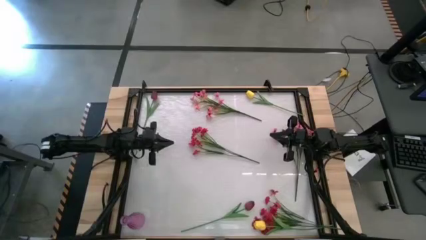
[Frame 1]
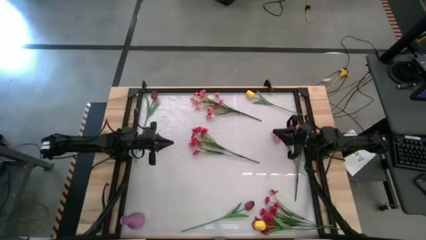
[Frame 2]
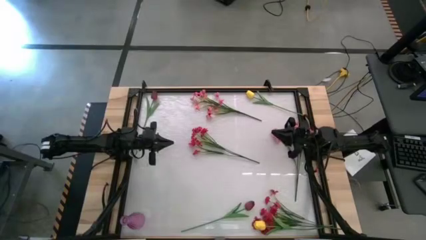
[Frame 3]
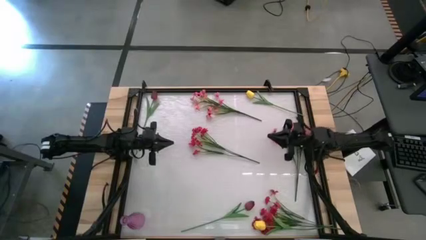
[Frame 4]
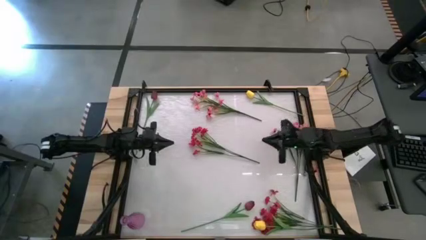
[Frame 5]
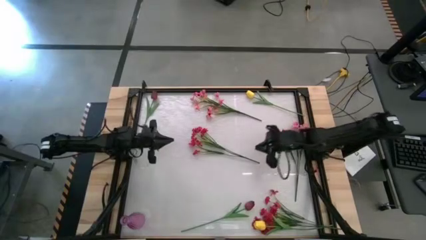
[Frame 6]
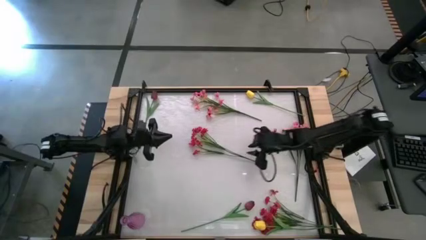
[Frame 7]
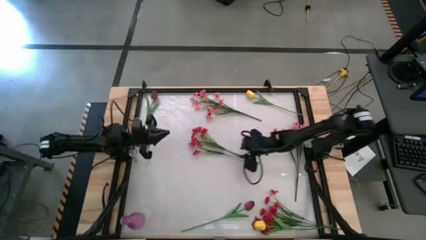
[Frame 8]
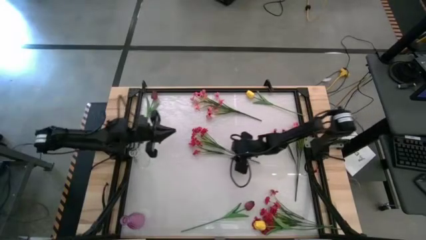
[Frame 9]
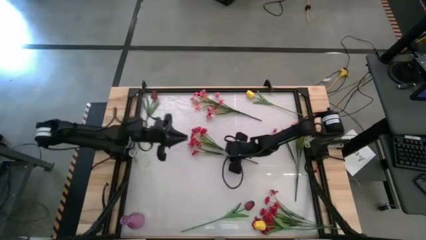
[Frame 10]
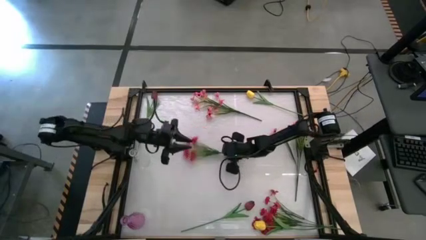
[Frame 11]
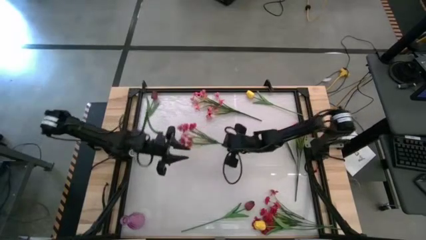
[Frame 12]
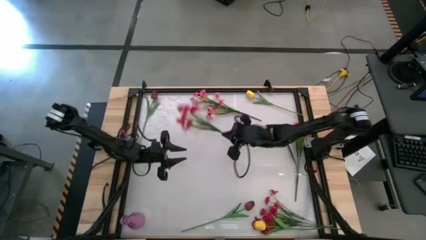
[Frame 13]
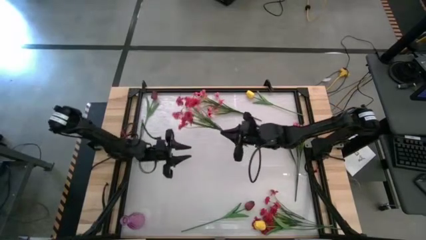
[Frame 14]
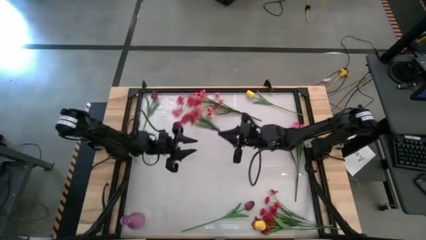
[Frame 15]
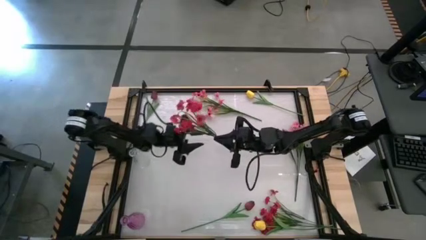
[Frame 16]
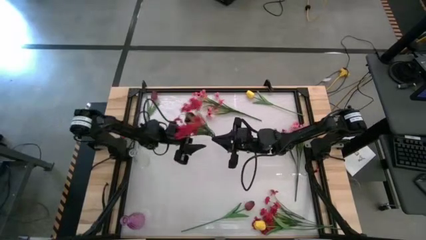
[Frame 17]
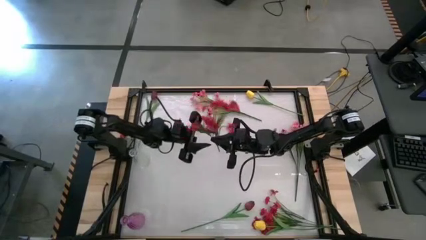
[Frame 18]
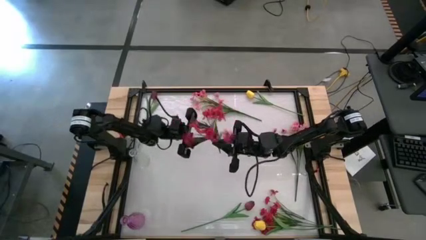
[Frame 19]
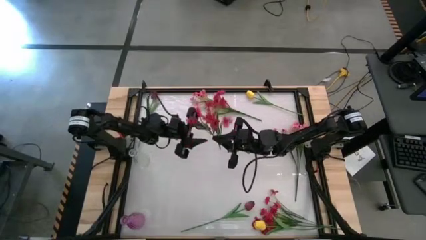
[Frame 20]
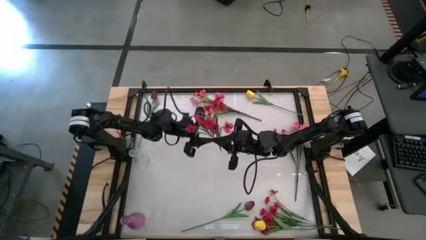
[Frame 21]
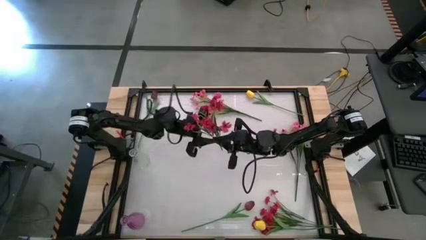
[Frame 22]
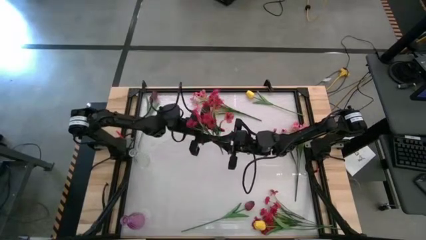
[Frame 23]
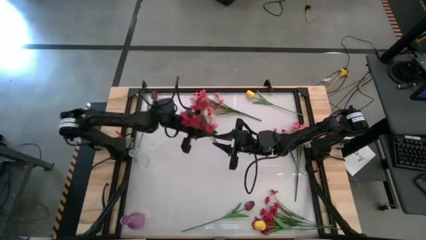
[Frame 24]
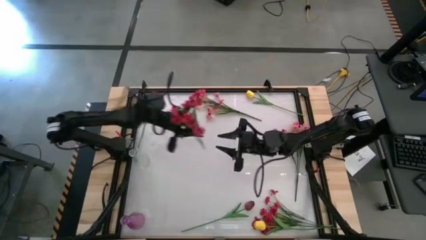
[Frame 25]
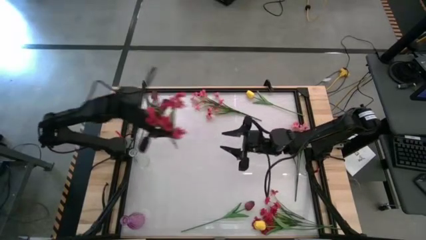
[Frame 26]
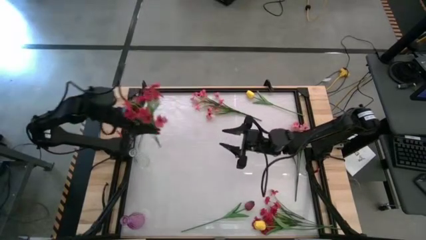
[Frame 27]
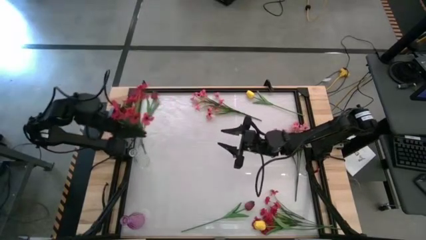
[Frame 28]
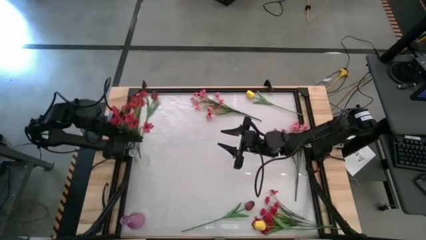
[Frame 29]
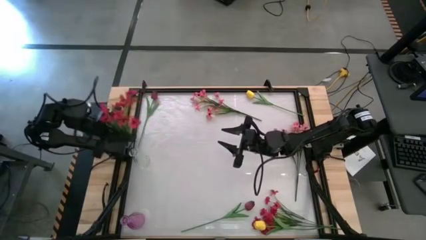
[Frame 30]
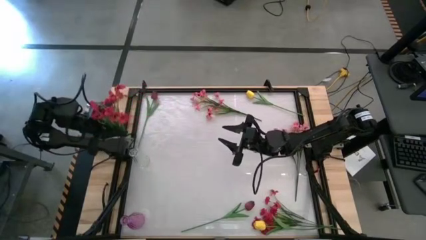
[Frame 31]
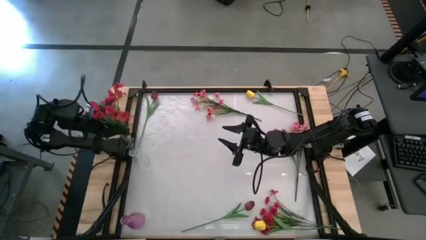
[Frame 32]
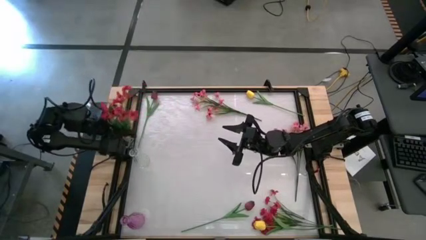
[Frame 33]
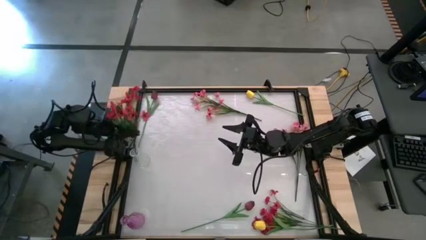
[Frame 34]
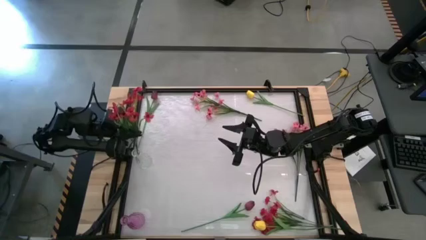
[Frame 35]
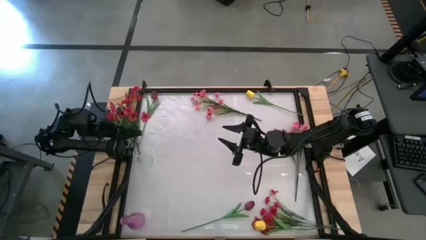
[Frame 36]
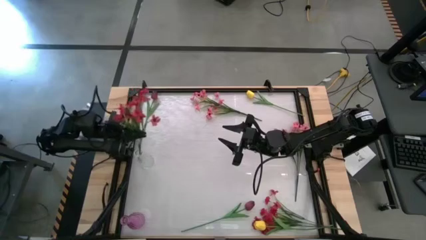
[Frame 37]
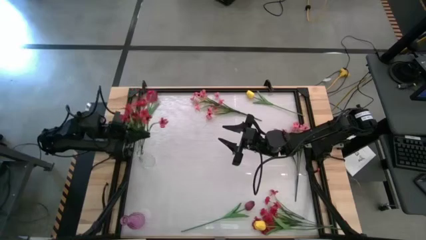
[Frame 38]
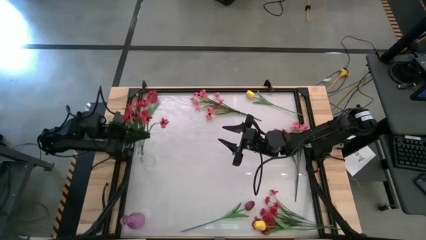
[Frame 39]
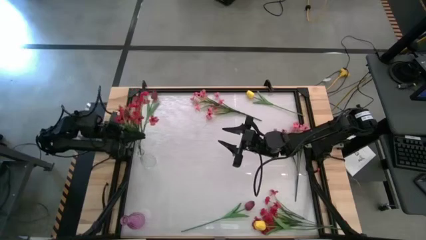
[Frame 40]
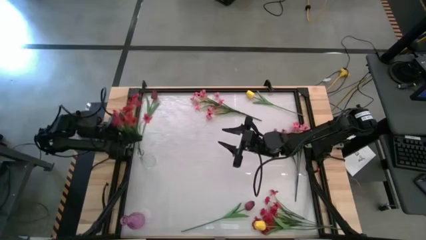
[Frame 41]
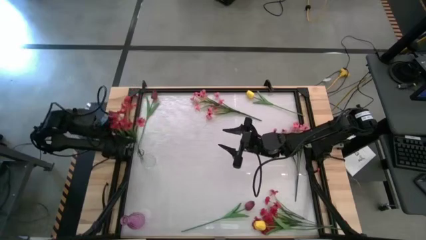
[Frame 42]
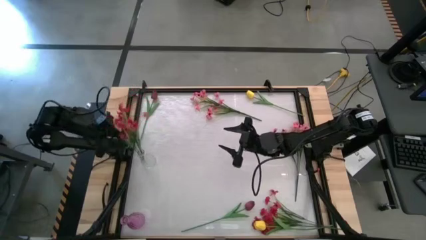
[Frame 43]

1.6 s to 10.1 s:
Task: Sort flowers into vase by color
Put the top red flower into the transparent vase

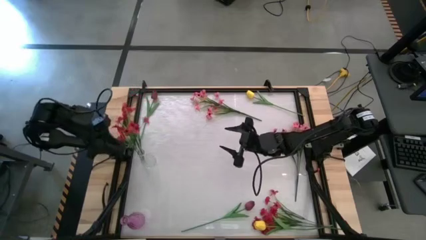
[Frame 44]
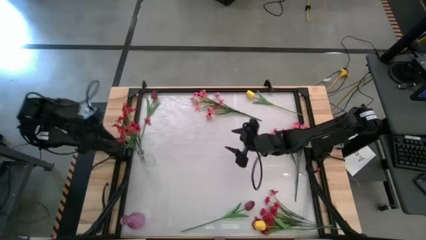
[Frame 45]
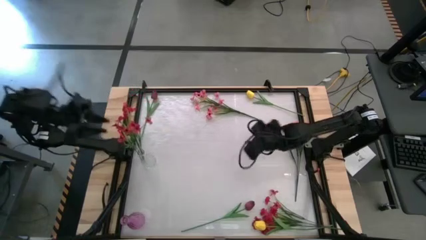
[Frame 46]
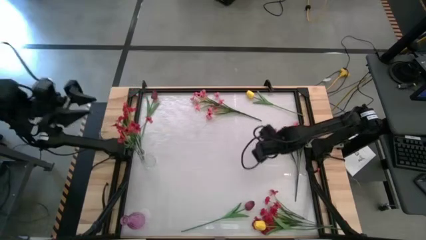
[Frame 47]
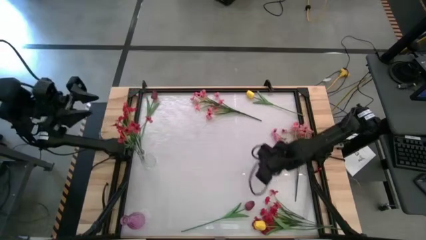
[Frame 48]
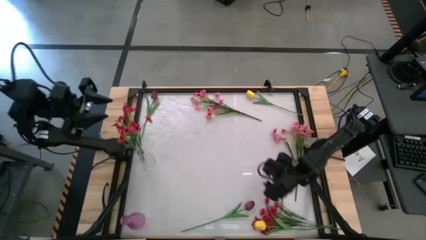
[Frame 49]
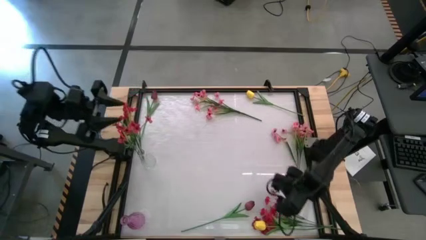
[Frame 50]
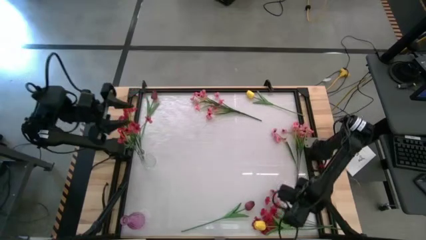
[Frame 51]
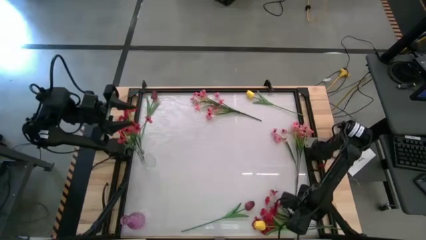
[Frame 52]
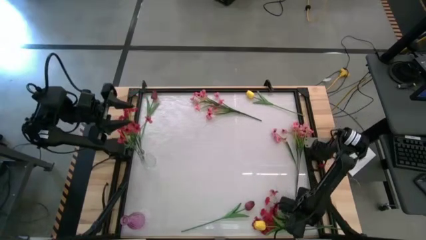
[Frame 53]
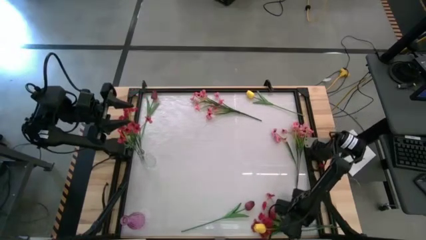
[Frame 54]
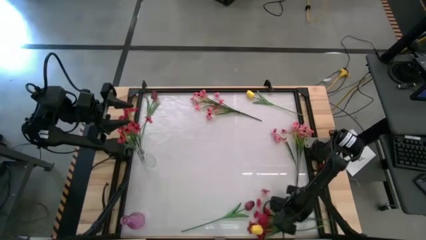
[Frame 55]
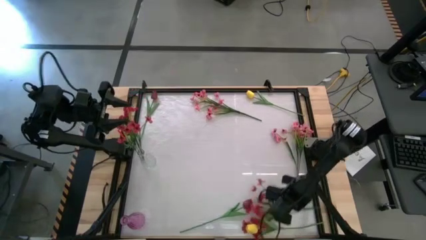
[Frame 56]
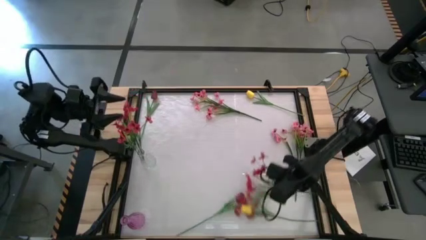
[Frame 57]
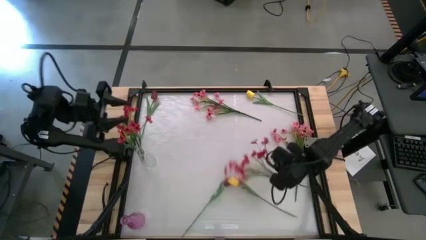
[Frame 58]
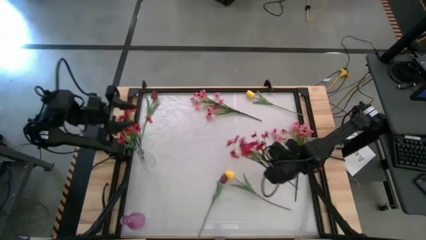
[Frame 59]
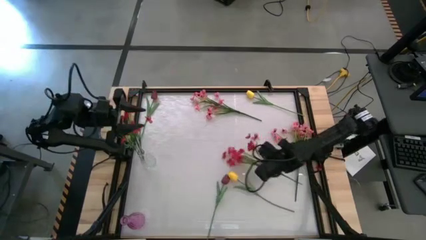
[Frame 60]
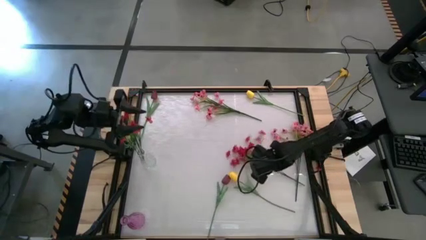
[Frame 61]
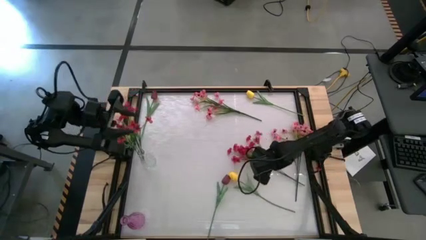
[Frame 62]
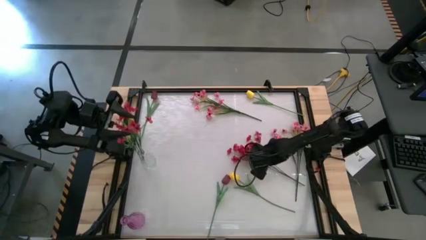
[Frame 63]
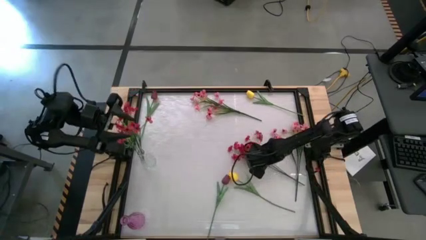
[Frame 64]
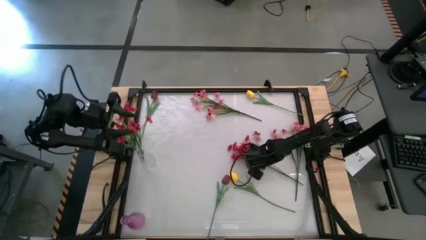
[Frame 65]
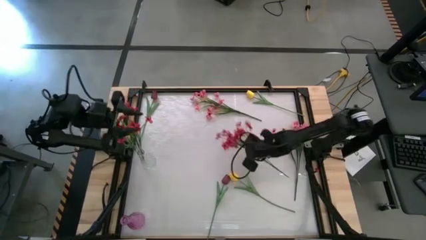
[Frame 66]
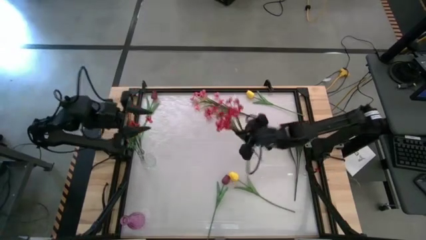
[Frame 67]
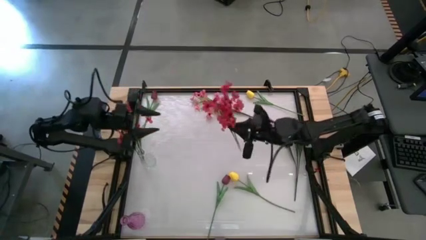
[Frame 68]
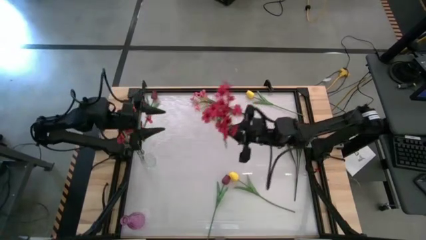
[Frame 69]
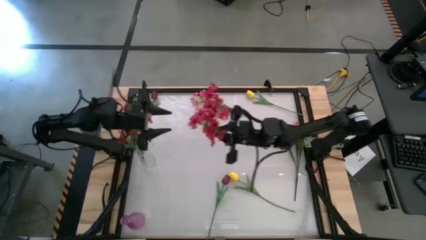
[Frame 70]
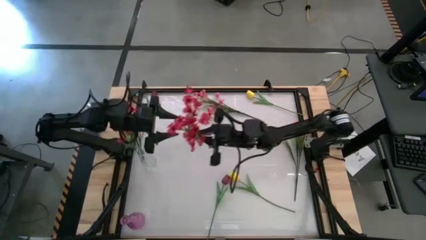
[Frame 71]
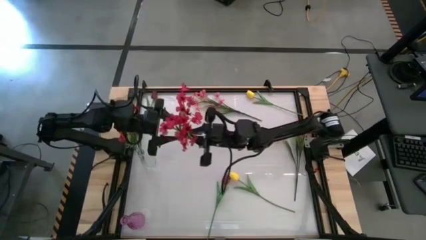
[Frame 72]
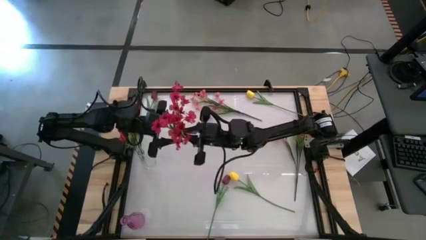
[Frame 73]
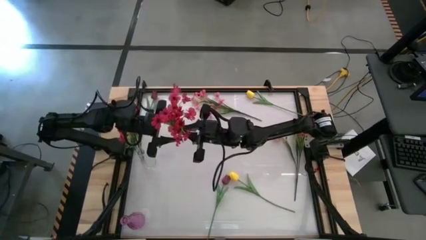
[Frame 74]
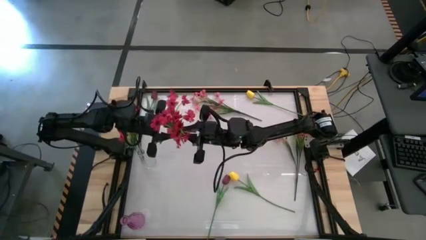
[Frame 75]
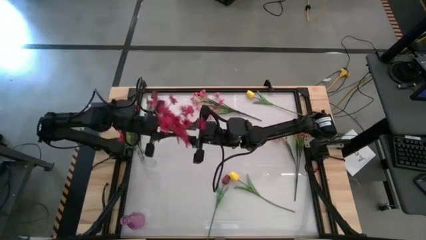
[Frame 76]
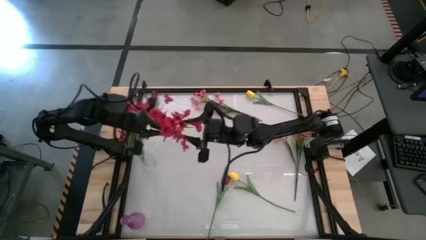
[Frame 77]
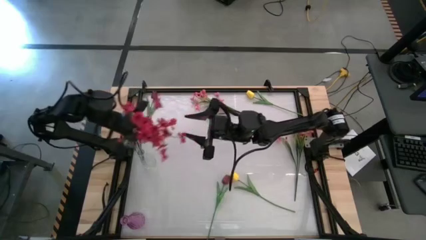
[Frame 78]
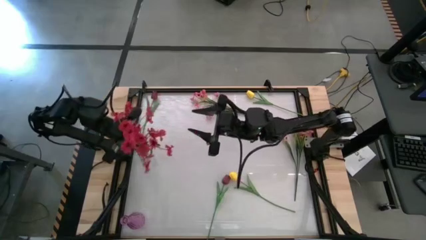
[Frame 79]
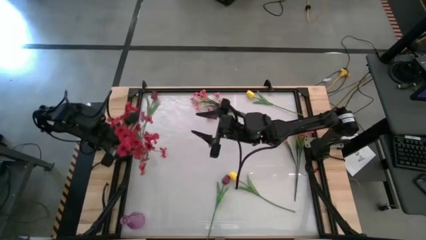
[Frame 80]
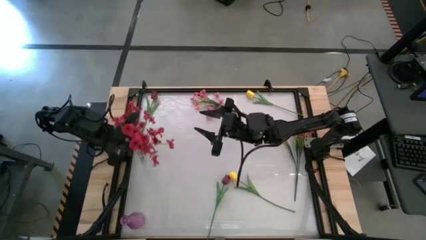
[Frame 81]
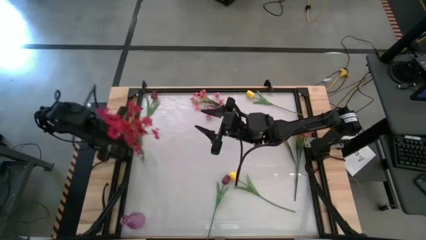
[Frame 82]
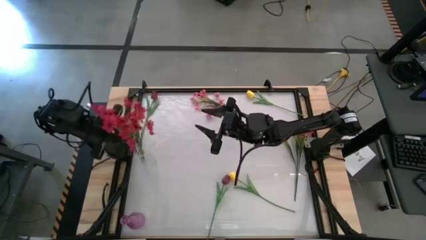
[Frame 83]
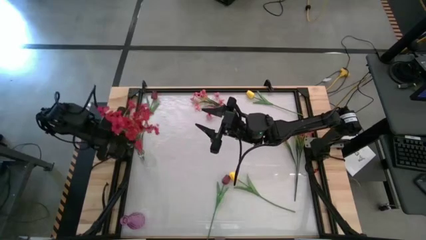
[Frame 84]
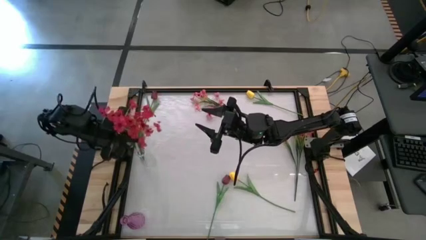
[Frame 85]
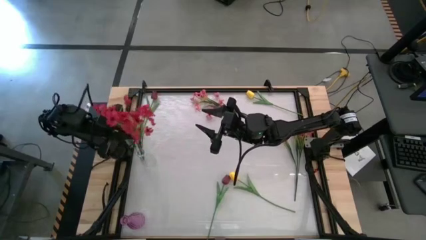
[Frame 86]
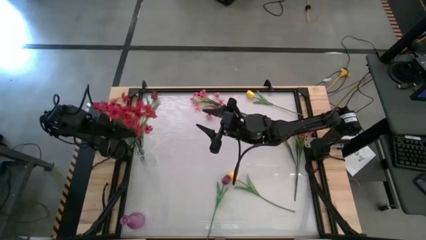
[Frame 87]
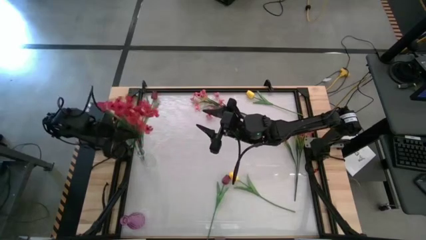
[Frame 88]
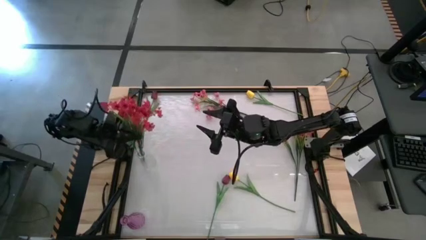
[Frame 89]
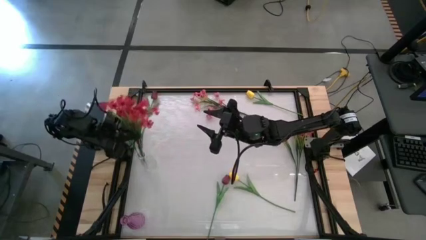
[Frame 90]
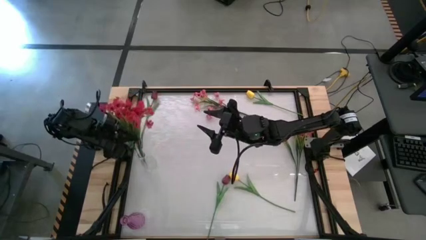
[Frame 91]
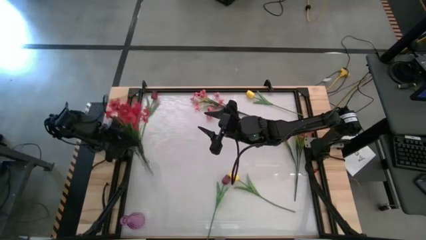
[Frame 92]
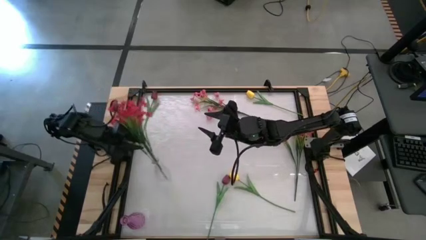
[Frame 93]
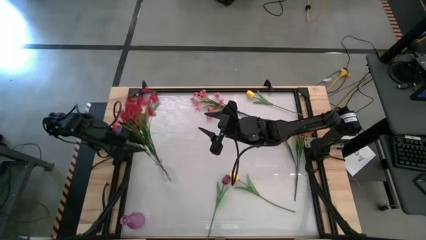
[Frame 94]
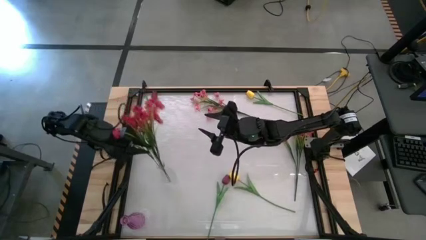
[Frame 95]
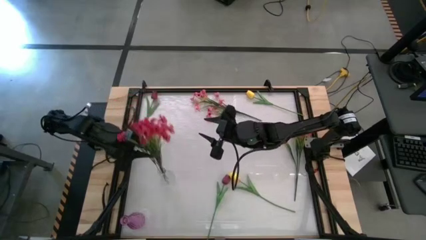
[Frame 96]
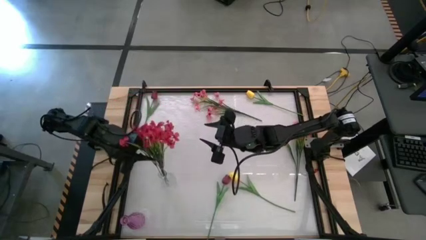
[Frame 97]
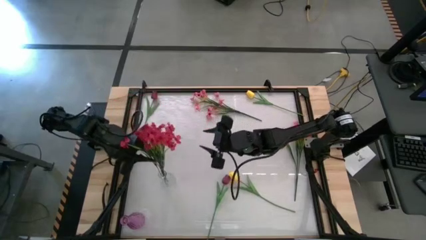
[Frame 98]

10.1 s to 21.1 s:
Put the red flower into the transparent vase
